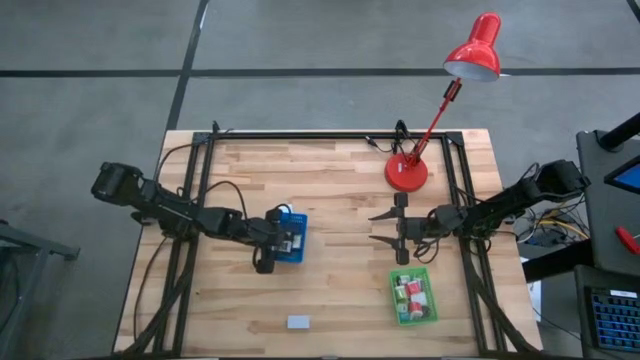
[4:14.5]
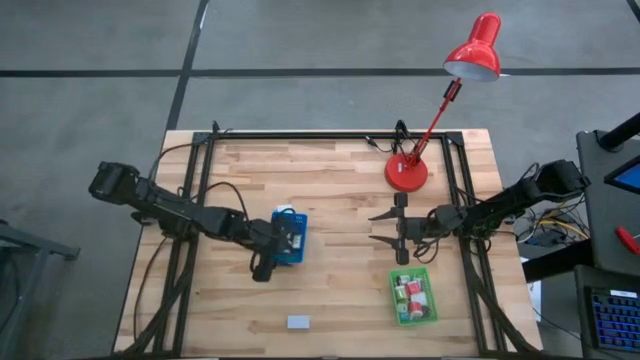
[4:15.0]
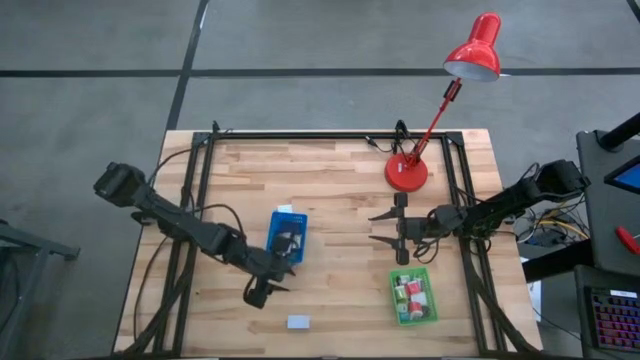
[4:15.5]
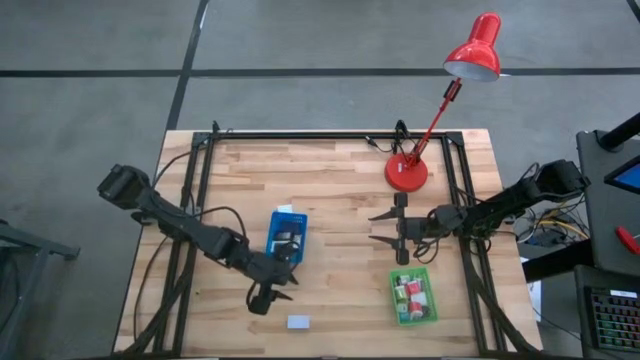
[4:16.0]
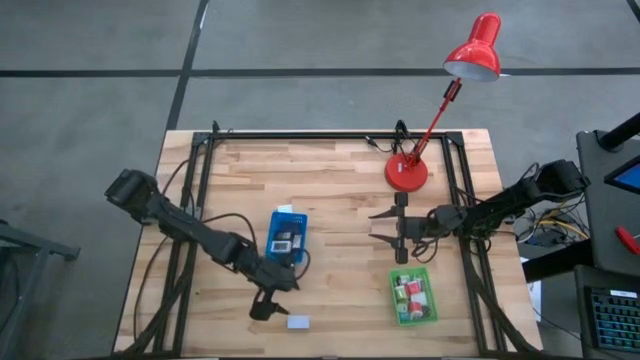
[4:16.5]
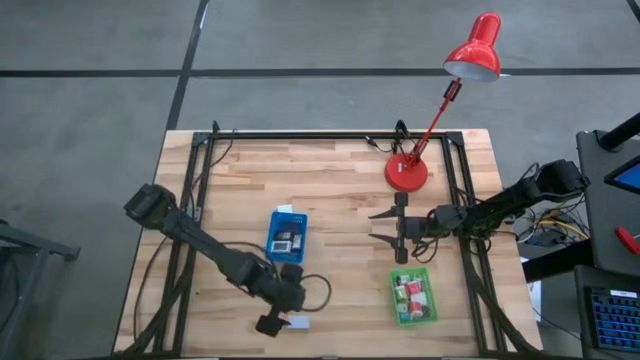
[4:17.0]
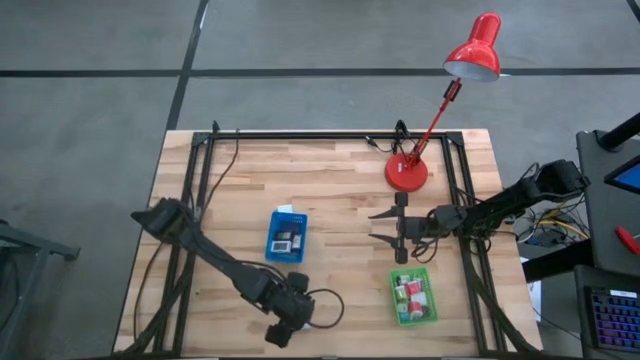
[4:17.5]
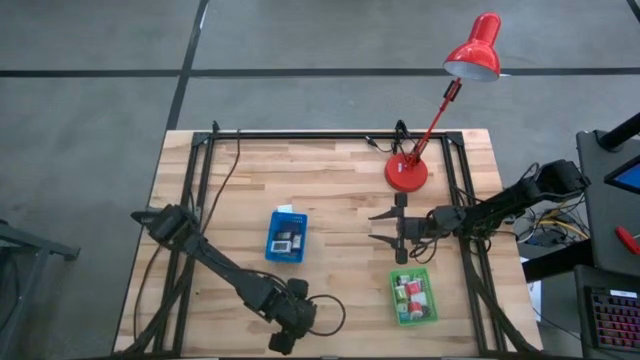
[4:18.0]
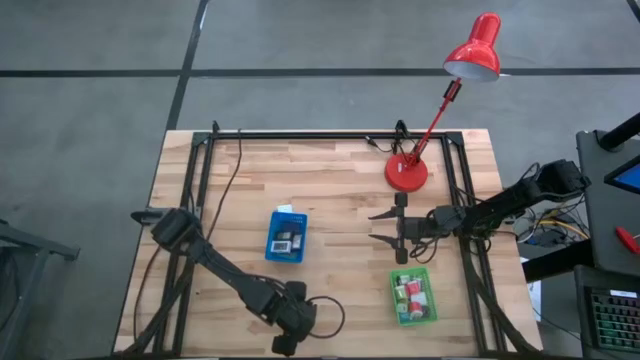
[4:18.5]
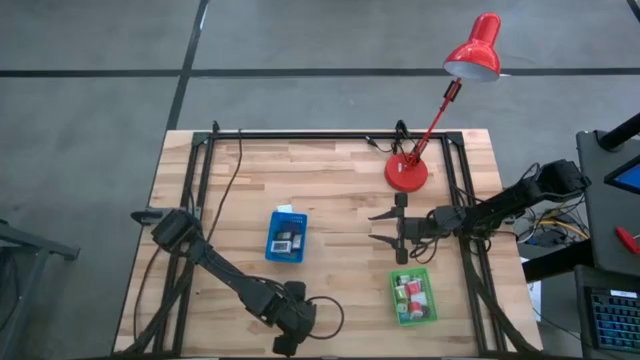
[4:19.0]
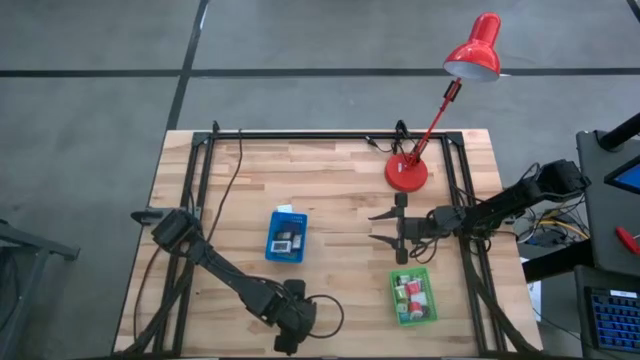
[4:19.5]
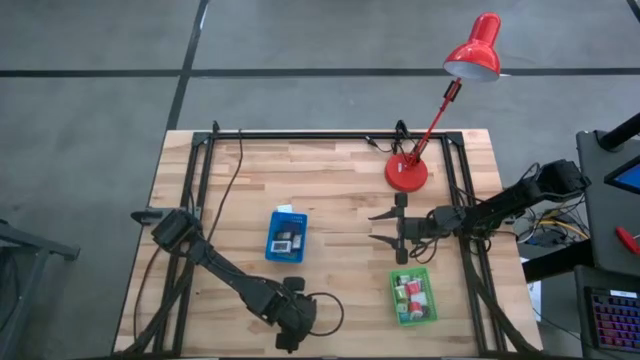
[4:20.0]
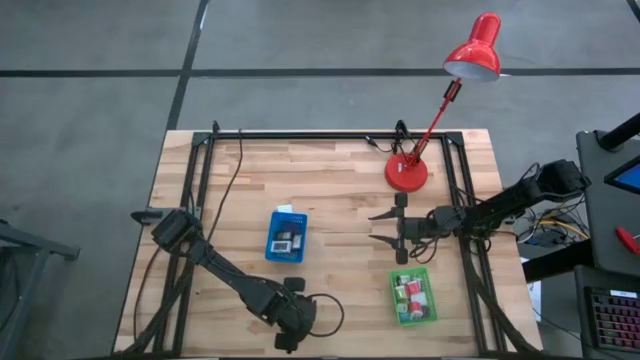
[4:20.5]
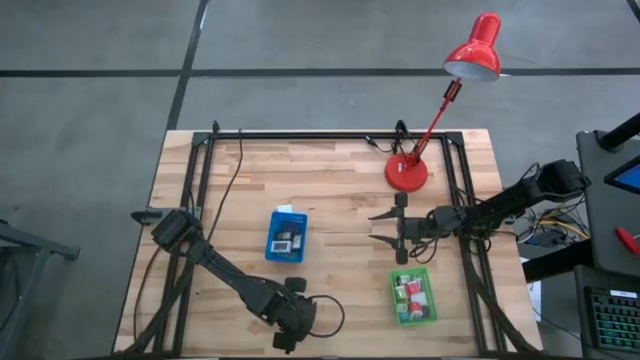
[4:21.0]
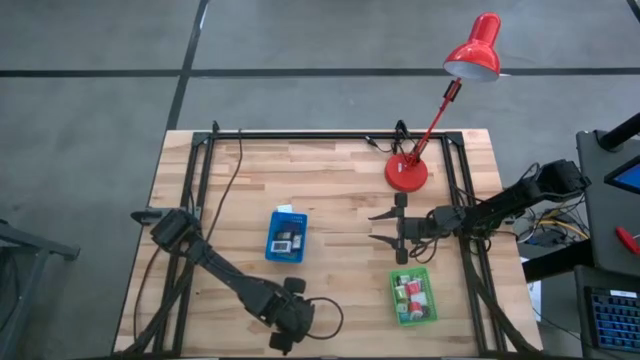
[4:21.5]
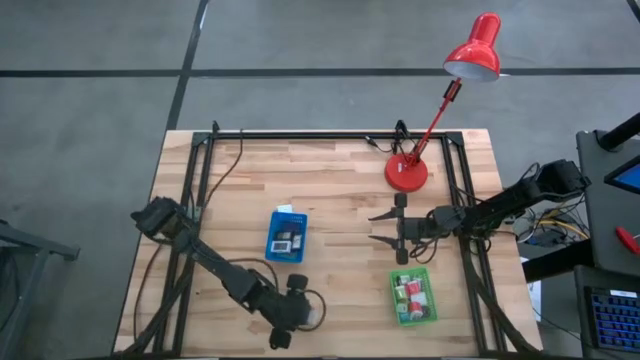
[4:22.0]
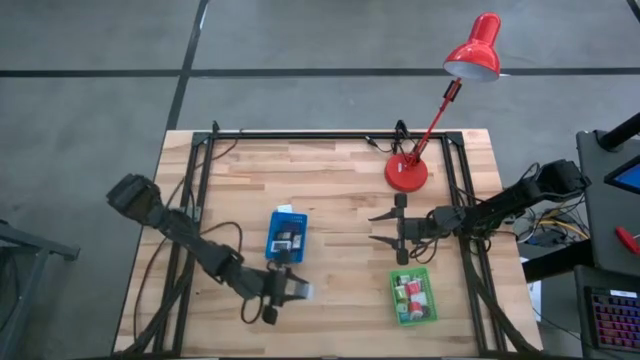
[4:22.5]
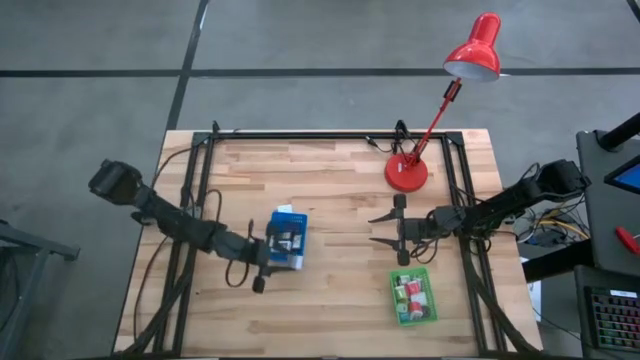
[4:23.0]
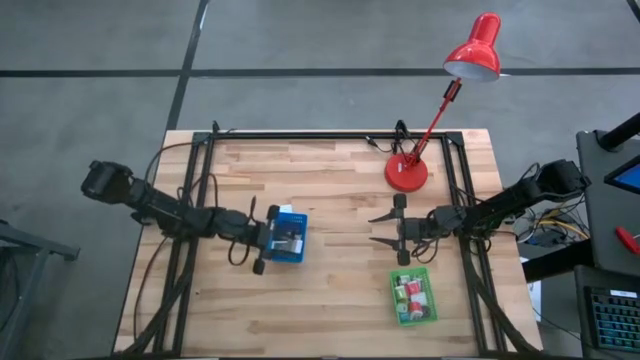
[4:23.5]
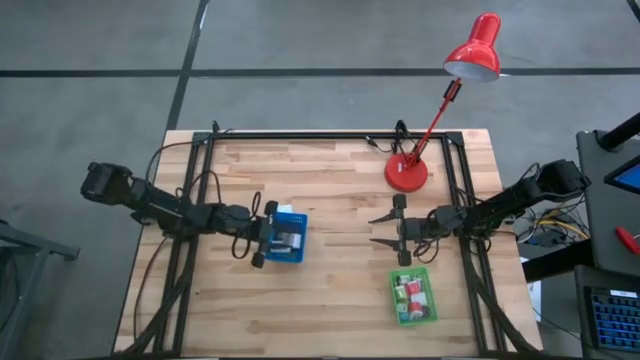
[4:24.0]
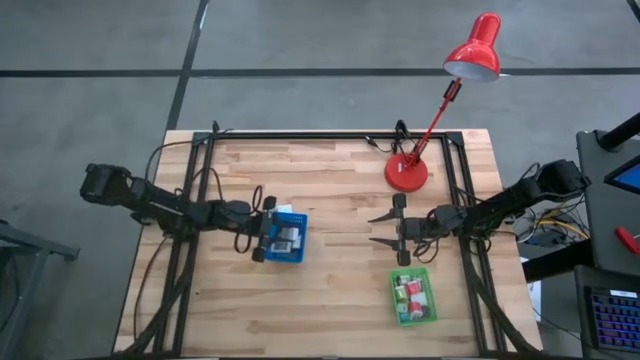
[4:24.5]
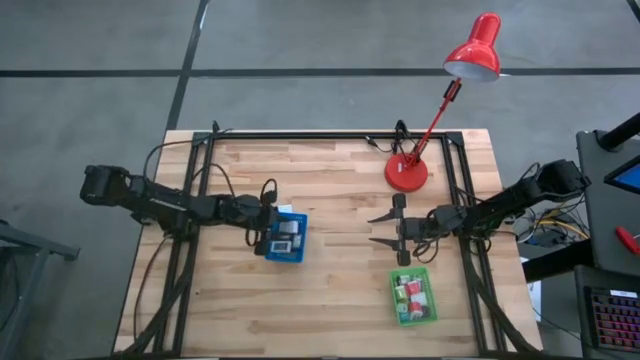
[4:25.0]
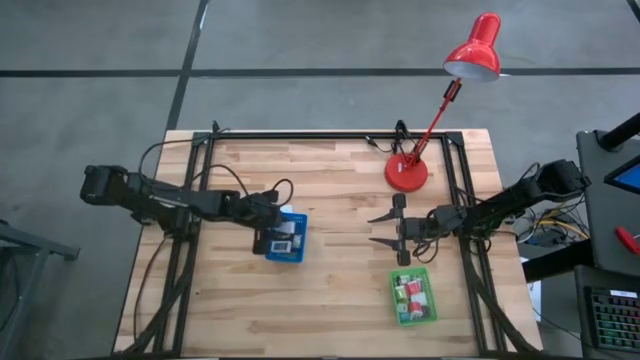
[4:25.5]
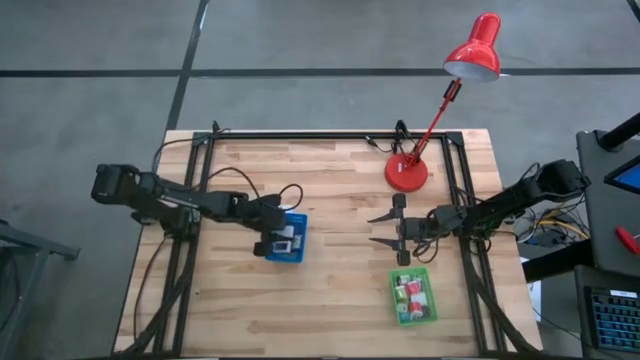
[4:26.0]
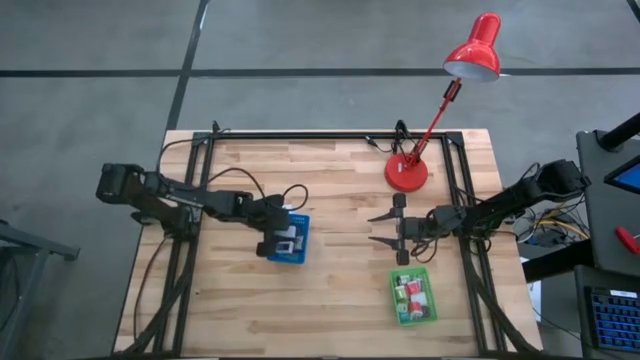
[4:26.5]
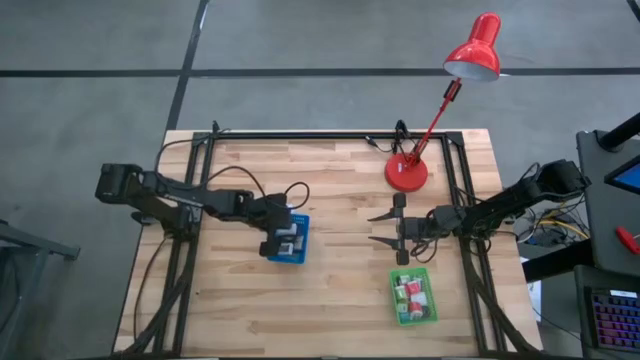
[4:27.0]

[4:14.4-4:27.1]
Task: Pick & Place Office items
Put the white digital clock into the blue bin
